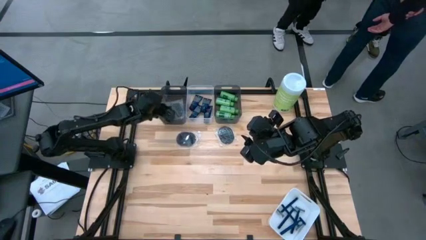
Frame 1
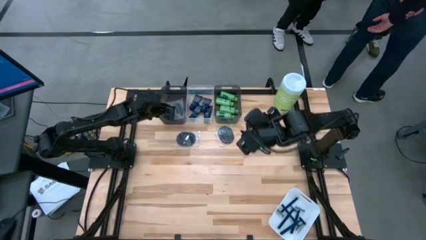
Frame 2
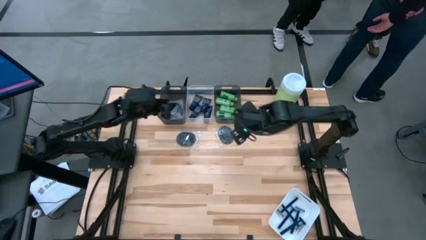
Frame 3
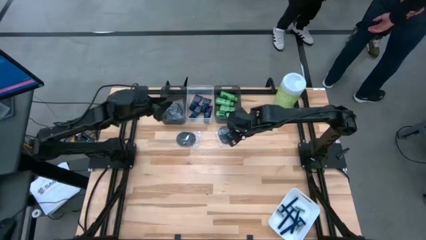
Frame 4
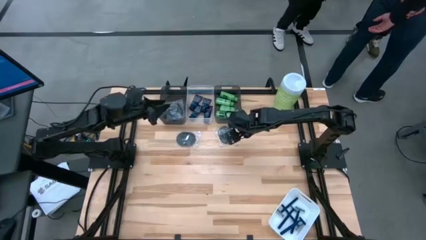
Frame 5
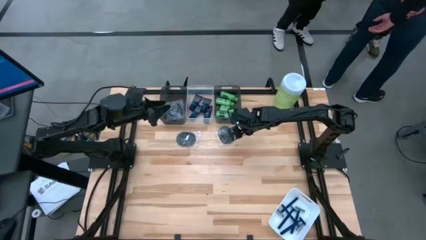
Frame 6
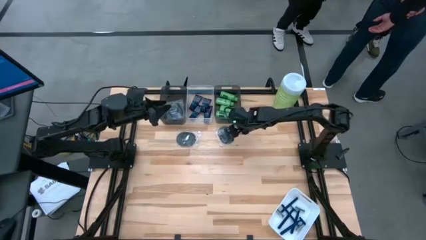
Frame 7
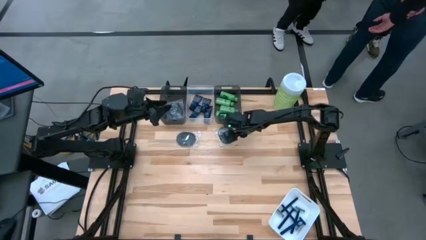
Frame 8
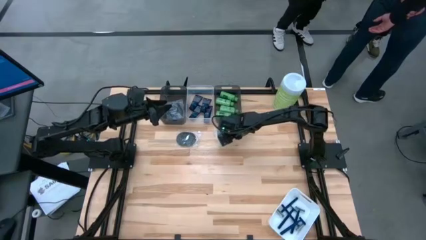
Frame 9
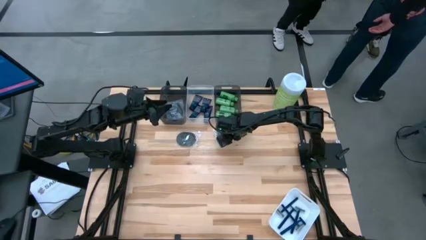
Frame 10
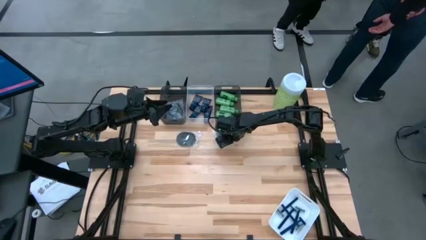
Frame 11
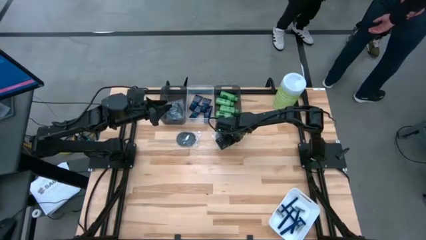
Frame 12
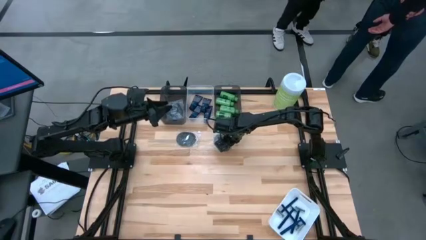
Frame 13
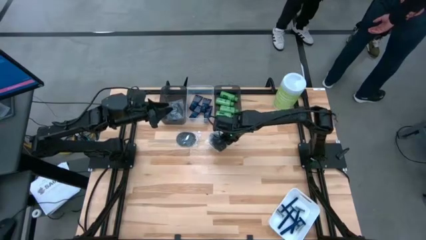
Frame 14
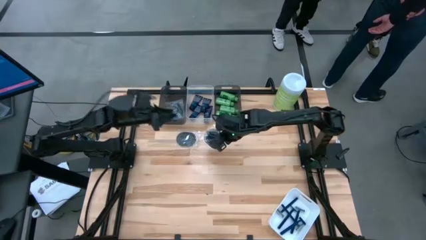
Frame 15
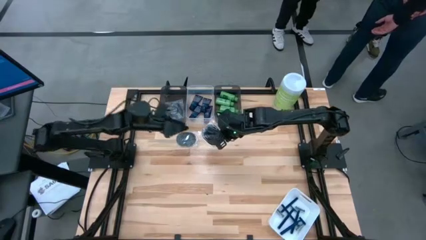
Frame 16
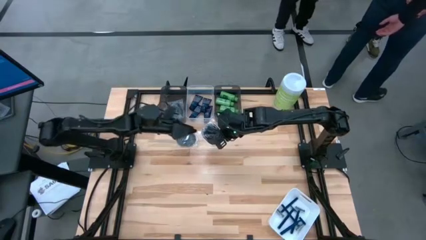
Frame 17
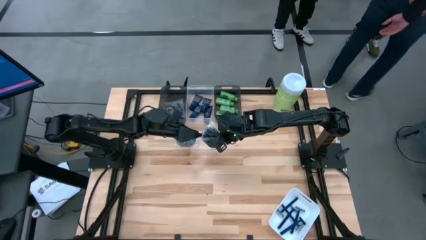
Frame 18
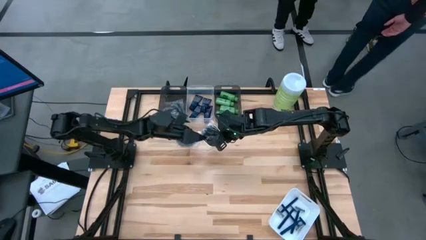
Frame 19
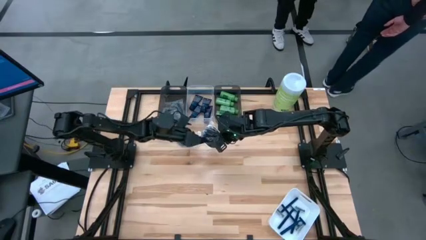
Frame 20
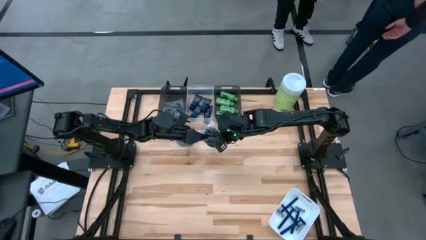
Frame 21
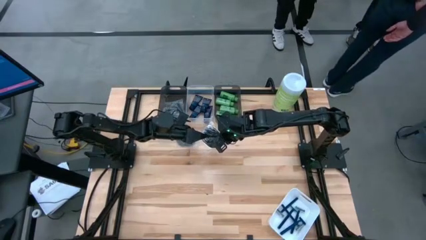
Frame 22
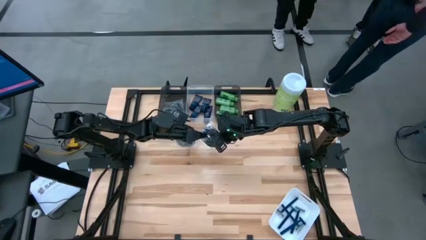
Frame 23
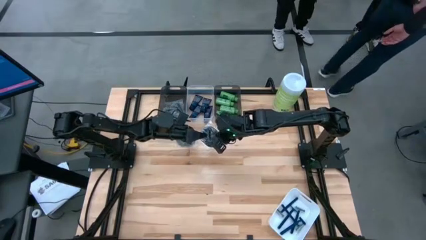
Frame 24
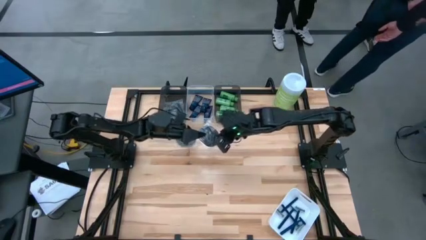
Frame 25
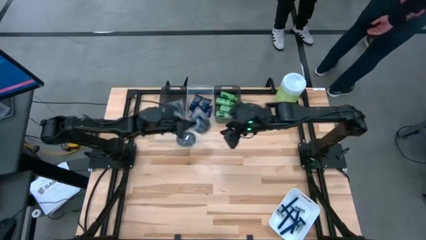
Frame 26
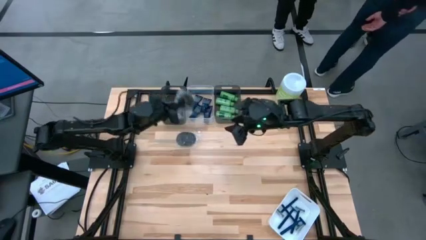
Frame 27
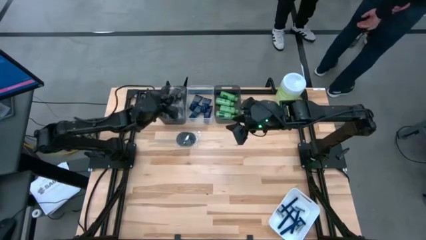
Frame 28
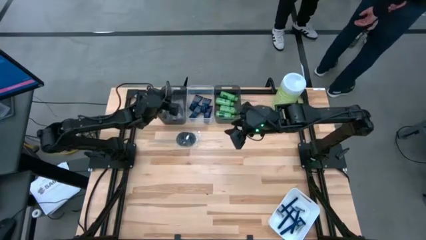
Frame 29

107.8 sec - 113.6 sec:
Task: Pick & Place Travel size toiletries
Put the black hairbrush into the left black bin

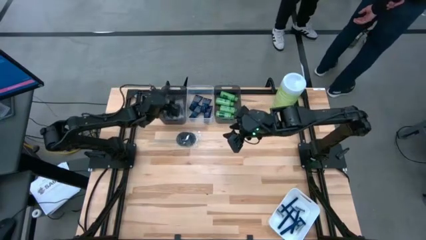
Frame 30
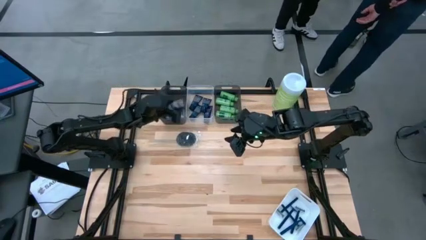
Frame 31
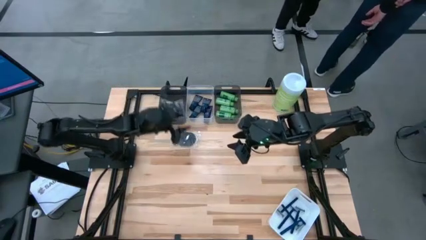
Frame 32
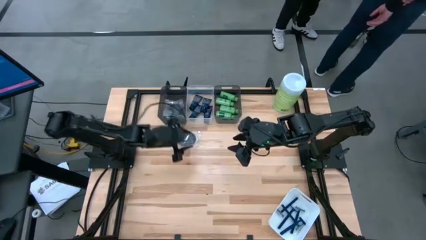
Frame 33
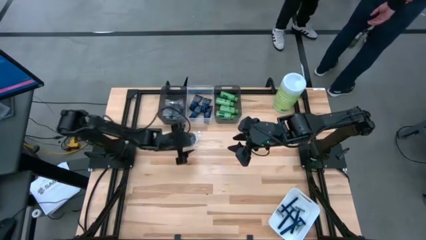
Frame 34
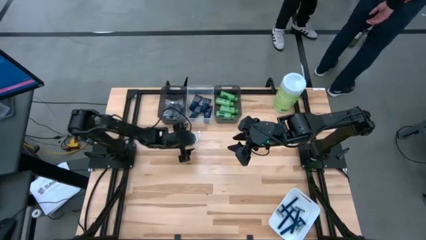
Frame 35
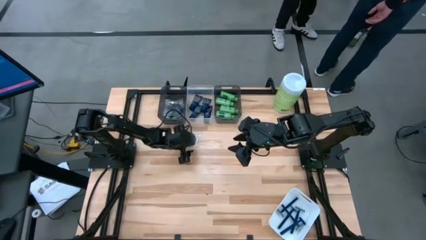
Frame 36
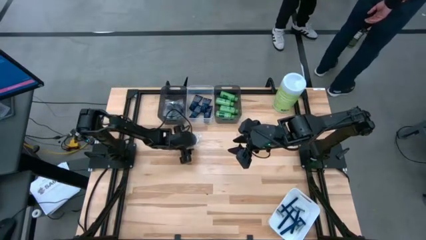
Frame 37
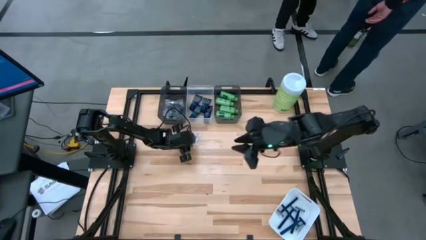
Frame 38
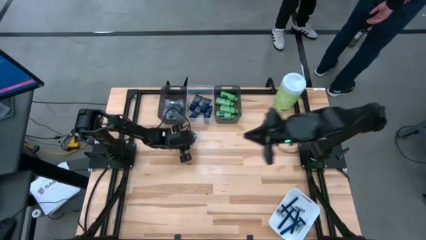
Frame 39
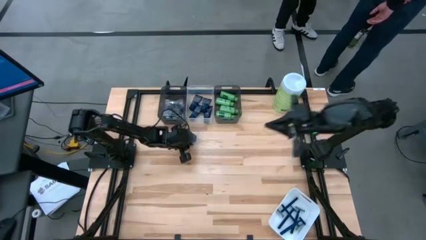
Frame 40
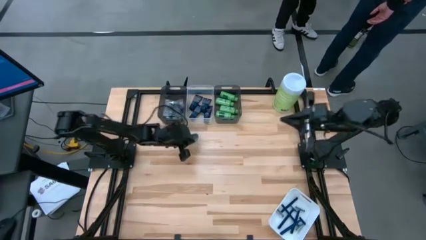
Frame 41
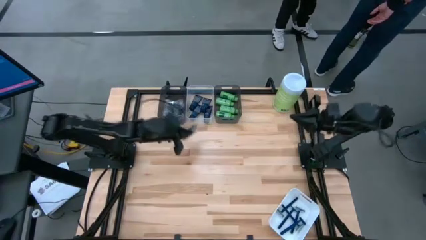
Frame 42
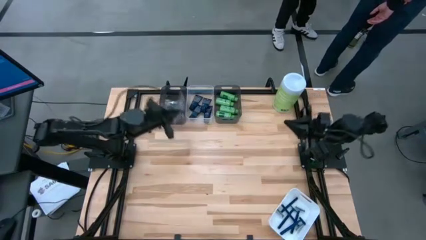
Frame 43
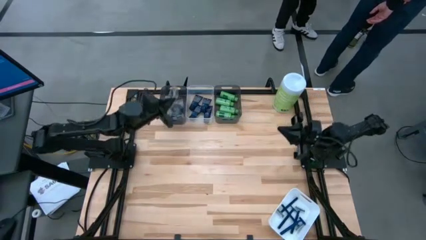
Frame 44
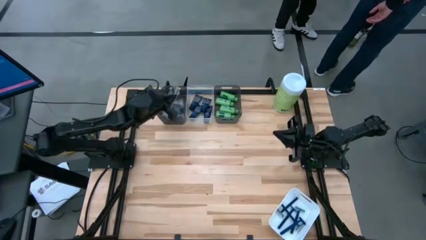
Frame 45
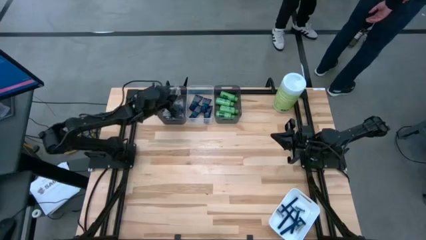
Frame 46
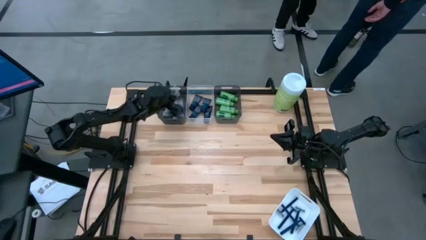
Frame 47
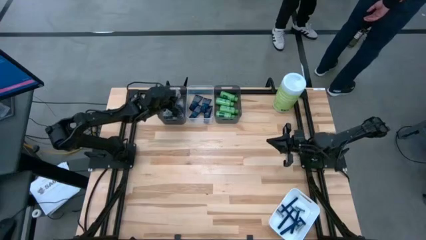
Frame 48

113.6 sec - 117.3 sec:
Put the black hairbrush into the left black bin

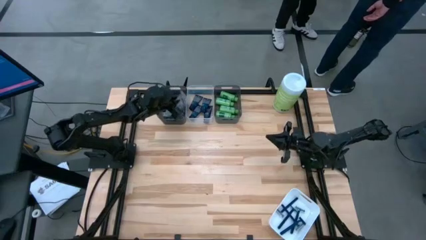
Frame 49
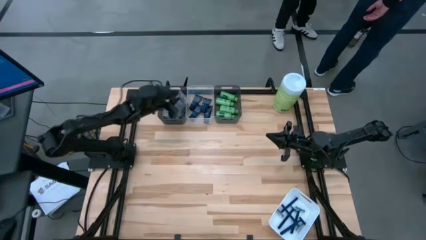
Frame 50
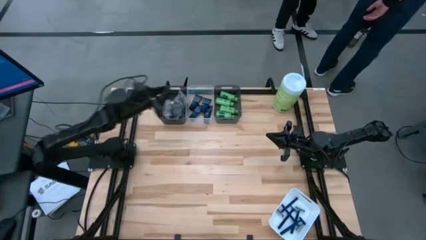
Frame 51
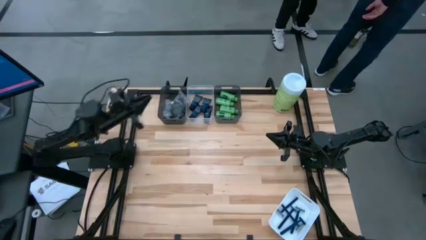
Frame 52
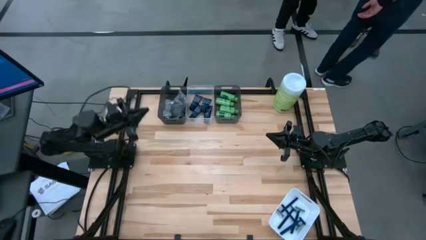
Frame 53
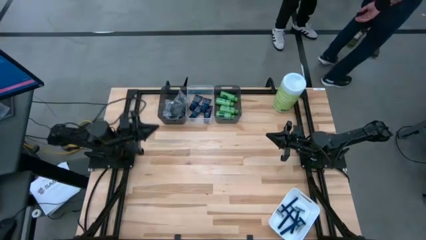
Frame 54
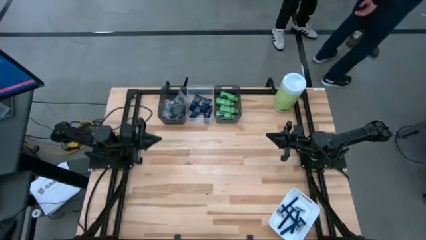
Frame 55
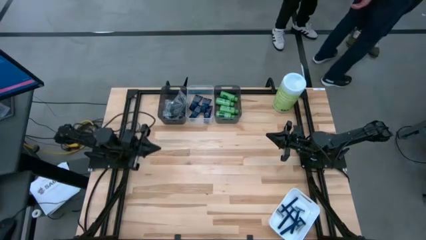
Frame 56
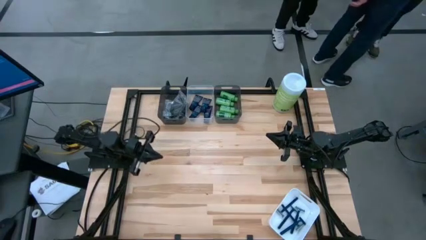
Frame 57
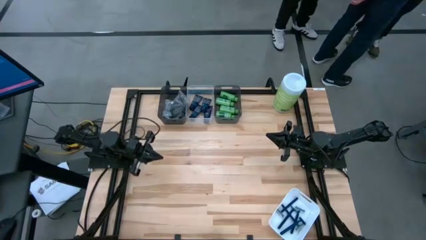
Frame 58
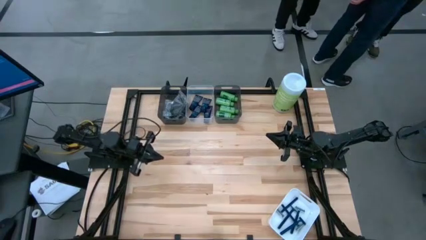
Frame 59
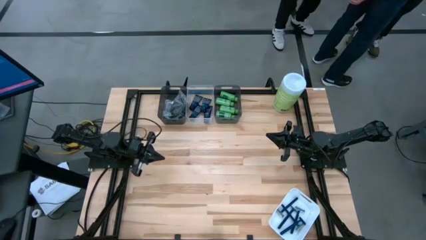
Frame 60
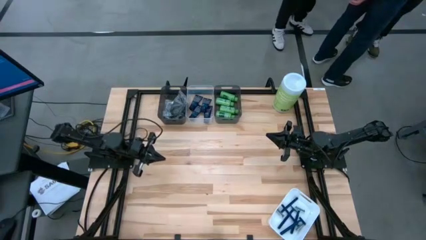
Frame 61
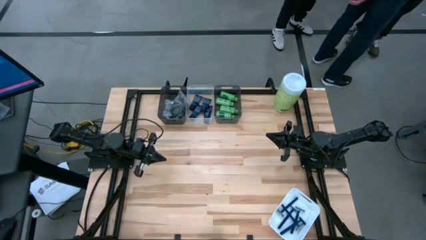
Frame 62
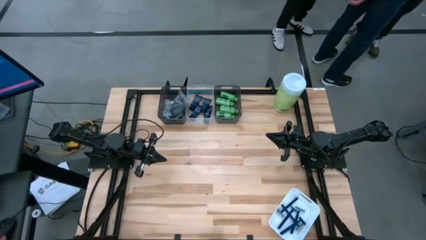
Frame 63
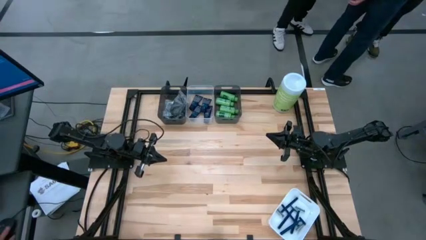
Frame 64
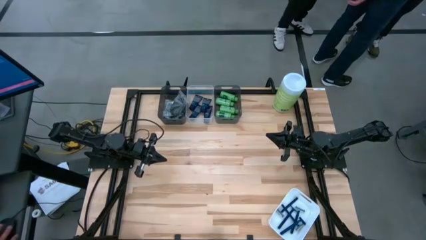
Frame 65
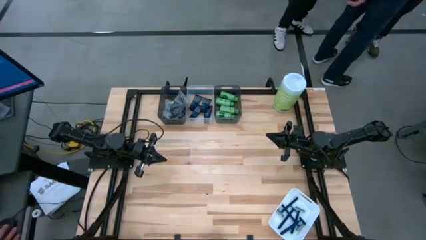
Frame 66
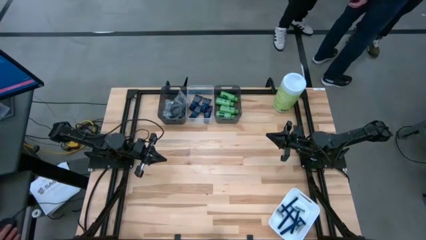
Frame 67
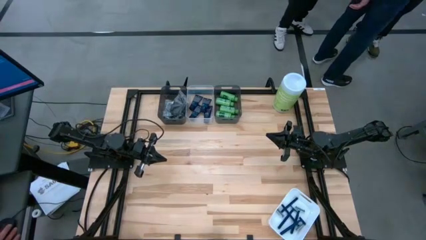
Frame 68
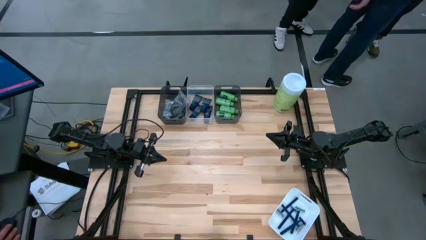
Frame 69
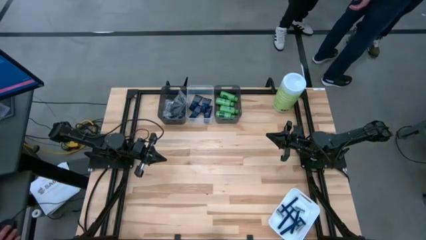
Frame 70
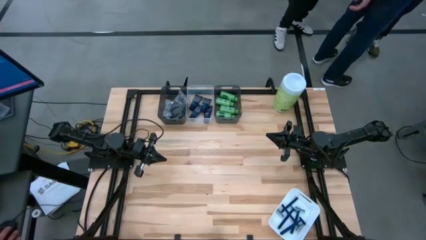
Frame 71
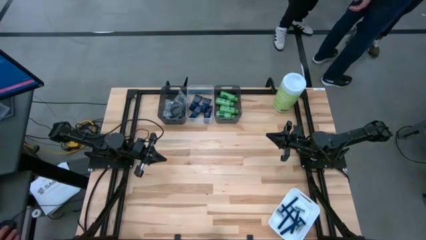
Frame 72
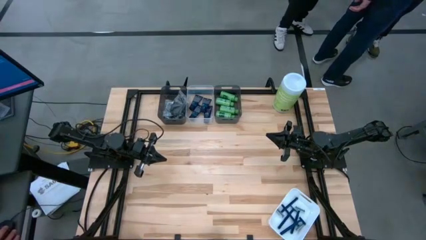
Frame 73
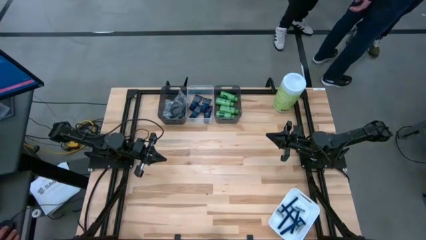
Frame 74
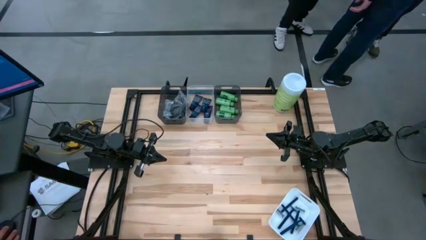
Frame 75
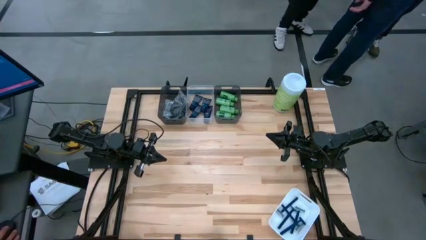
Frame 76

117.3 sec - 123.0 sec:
Return to Home Position

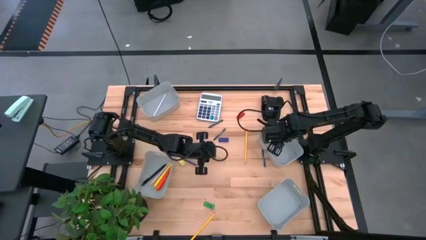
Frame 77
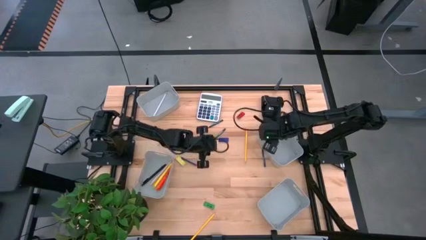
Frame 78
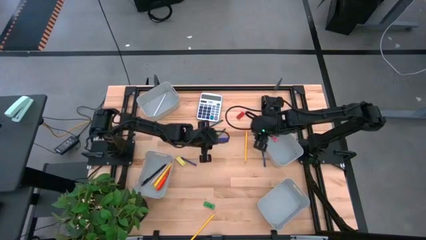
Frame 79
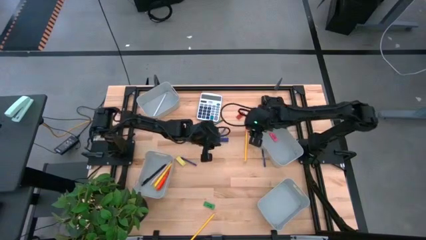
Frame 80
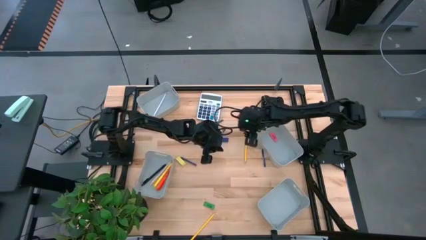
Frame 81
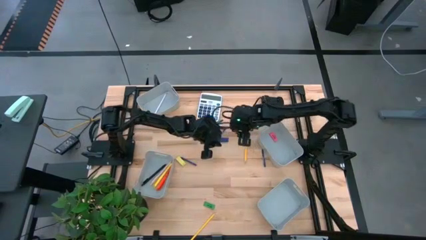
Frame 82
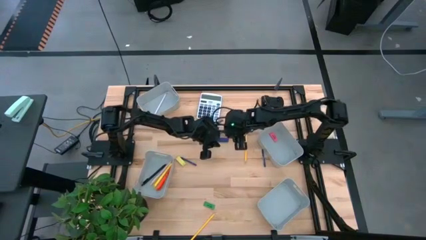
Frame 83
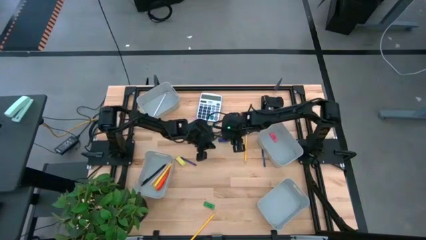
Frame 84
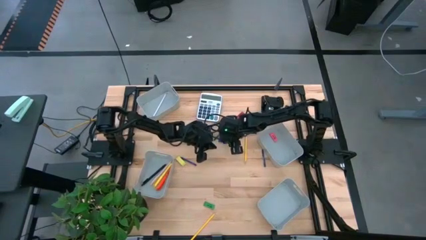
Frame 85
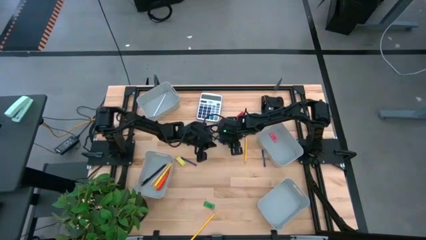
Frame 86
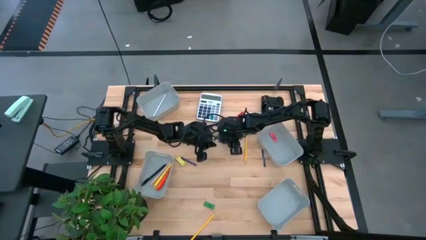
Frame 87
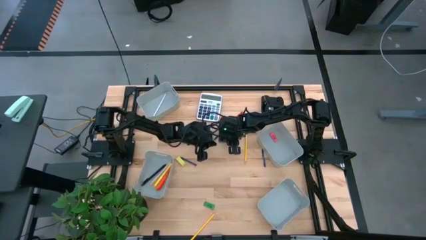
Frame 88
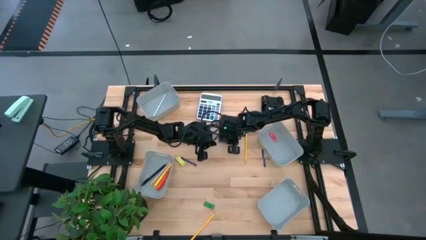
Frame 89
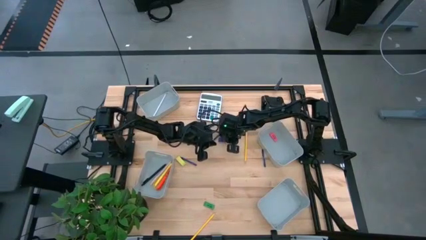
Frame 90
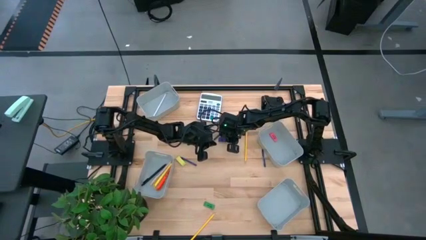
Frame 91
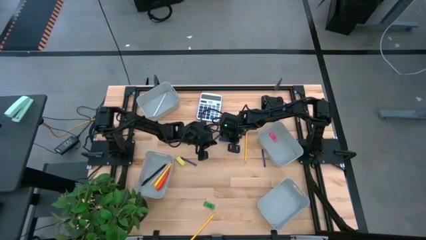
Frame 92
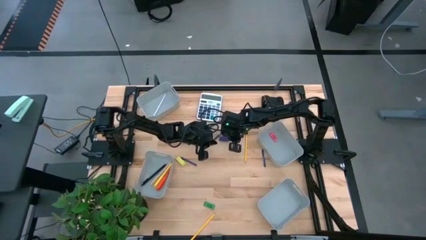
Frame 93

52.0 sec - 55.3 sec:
Task: Sort crayons/erasers/pens/pencils in bins
Put the blue eraser into the top left gray bin
